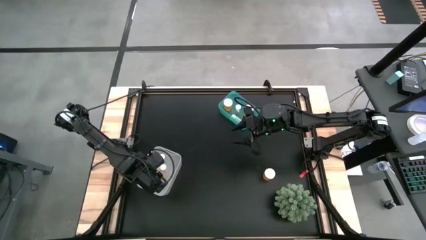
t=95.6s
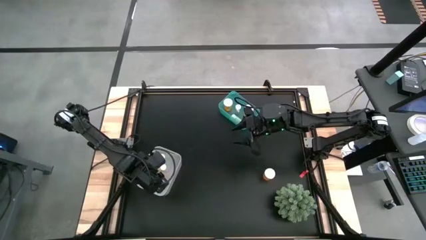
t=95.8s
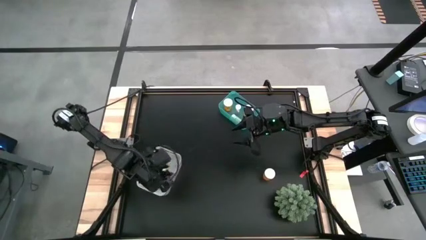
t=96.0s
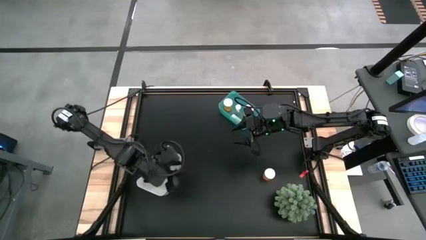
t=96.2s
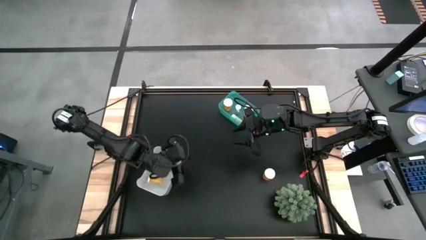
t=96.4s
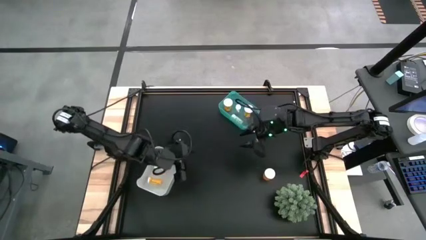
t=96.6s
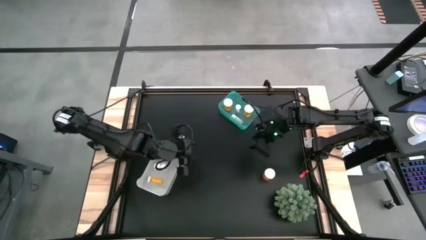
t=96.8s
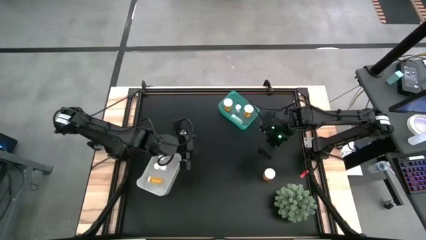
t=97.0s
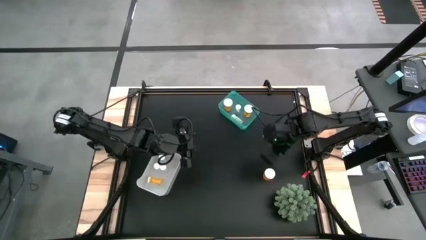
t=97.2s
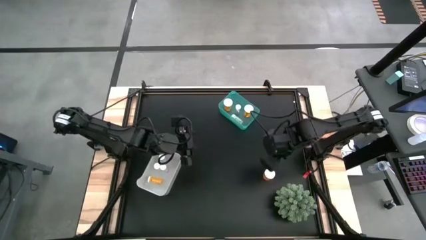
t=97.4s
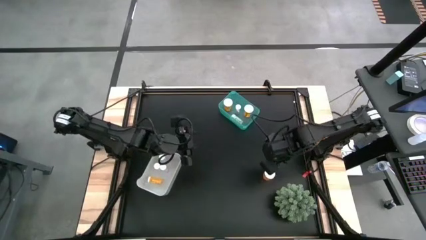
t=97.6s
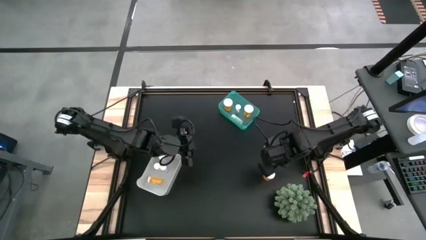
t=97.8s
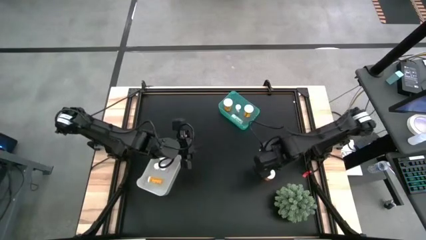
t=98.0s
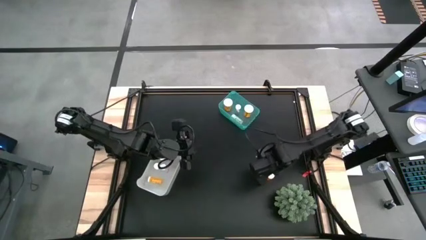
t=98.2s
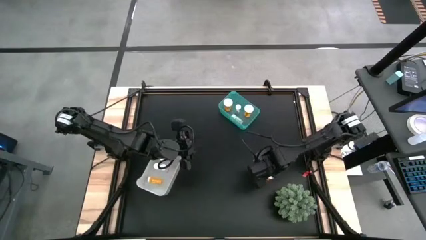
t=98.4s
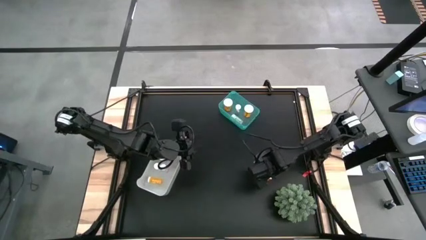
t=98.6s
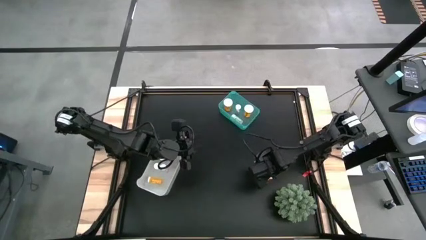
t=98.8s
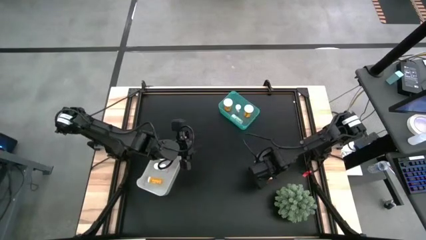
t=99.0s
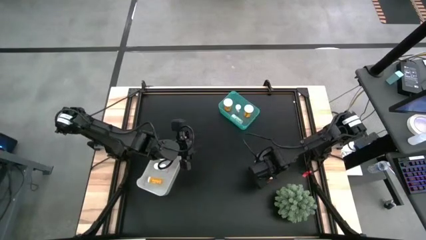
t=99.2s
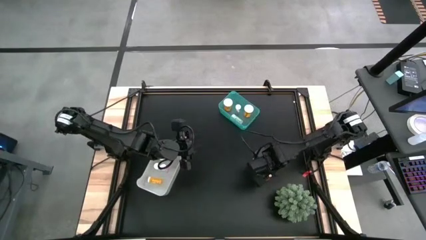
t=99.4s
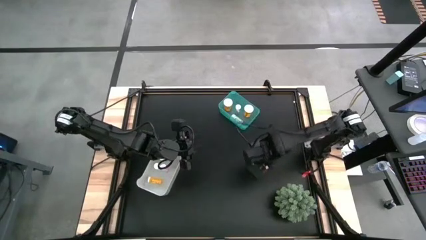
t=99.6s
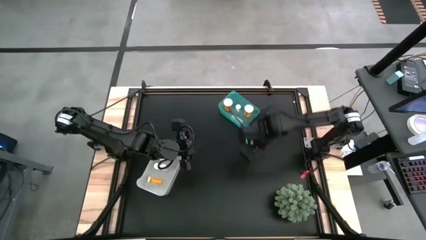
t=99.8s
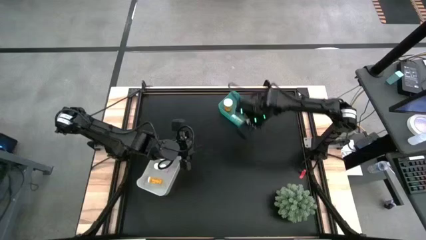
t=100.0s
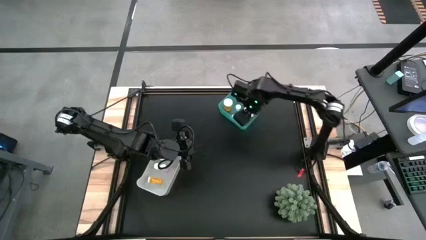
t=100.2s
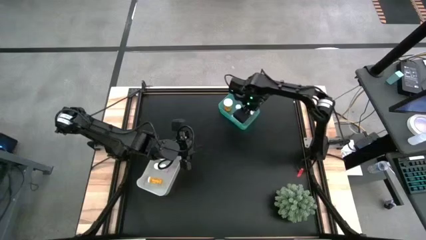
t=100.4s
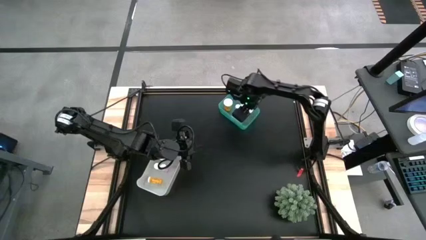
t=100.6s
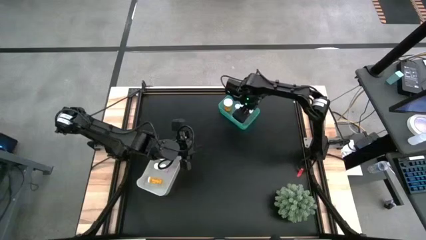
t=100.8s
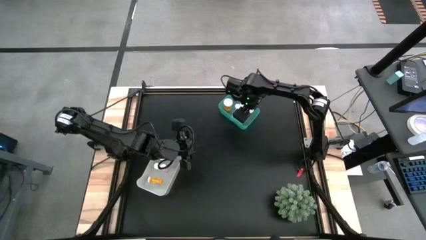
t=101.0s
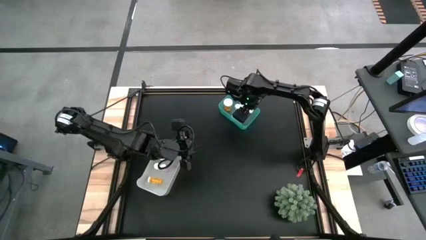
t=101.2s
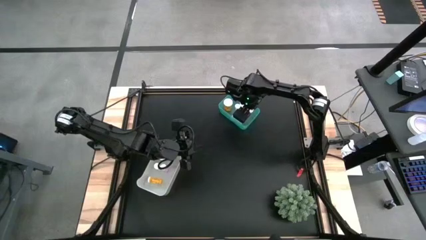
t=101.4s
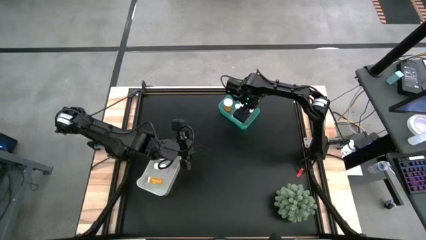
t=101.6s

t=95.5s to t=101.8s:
Task: Pick and place medicine bottles into bin by pill shape (circle, oval)
Put the orange capsule bottle into the blue bin

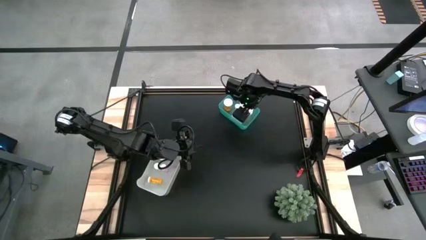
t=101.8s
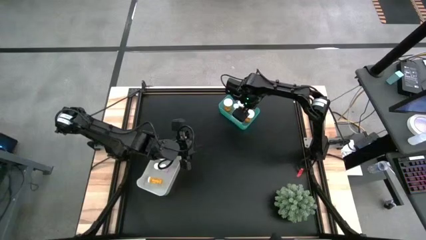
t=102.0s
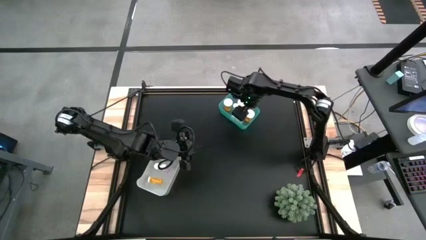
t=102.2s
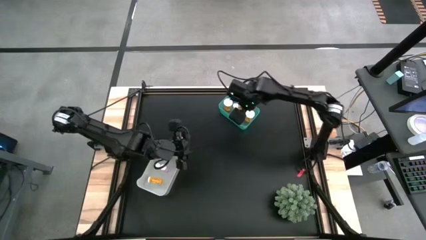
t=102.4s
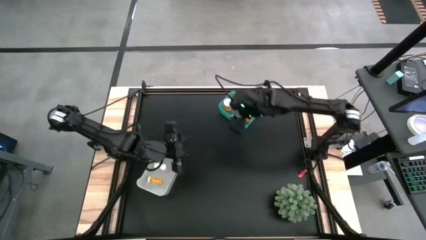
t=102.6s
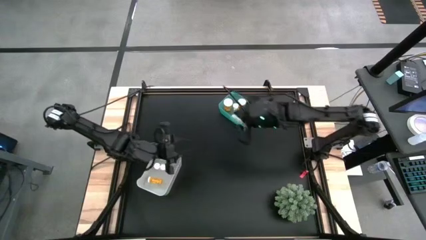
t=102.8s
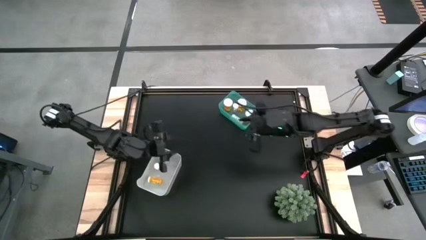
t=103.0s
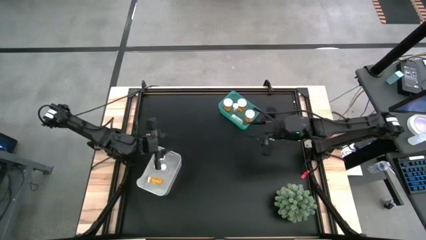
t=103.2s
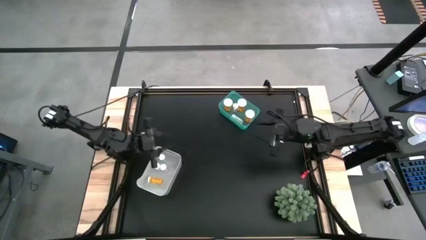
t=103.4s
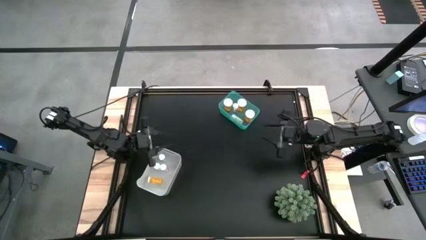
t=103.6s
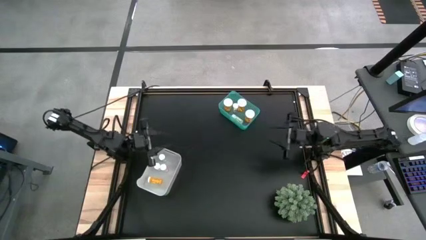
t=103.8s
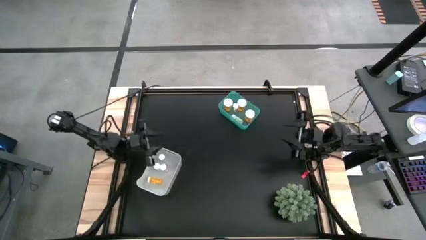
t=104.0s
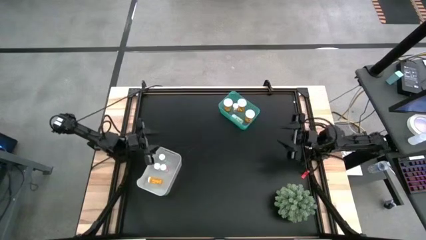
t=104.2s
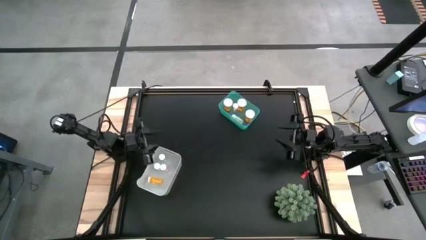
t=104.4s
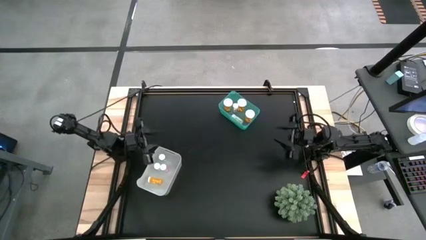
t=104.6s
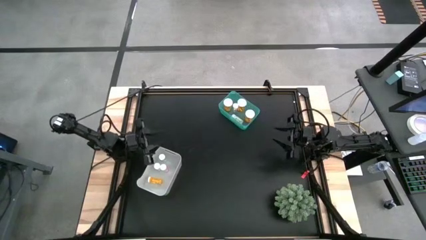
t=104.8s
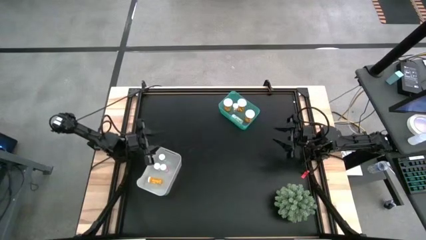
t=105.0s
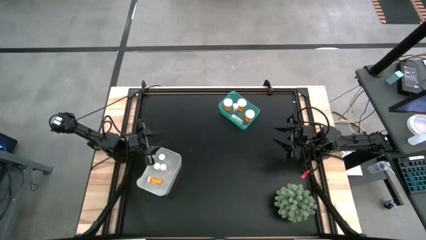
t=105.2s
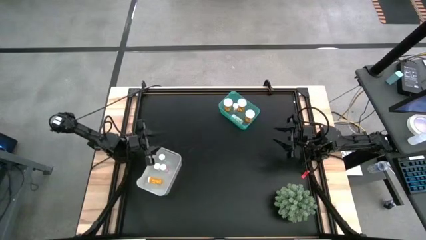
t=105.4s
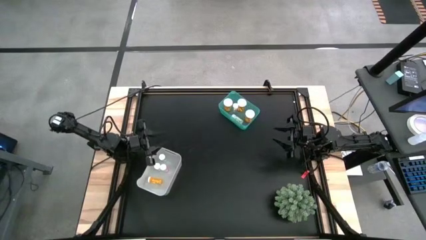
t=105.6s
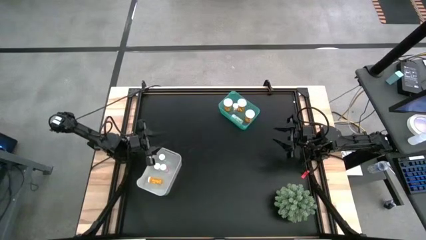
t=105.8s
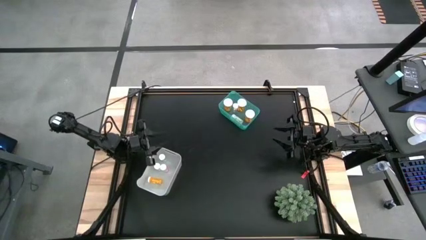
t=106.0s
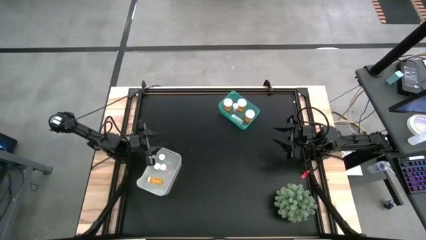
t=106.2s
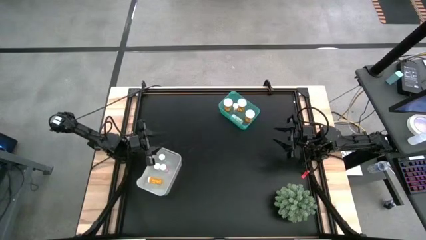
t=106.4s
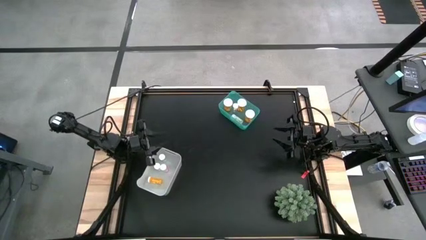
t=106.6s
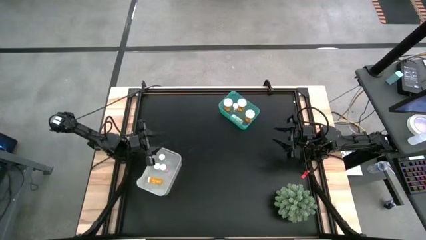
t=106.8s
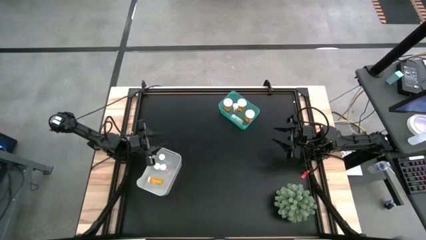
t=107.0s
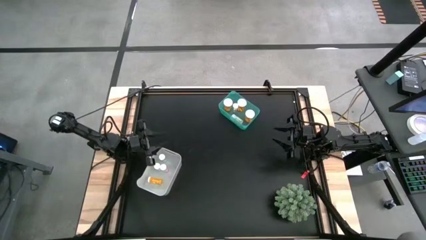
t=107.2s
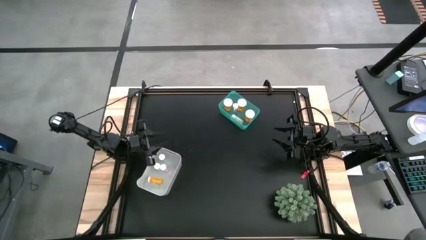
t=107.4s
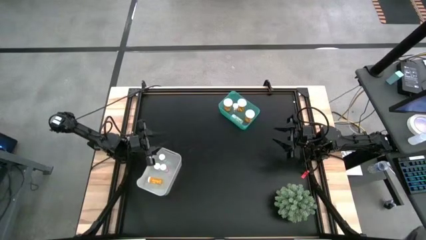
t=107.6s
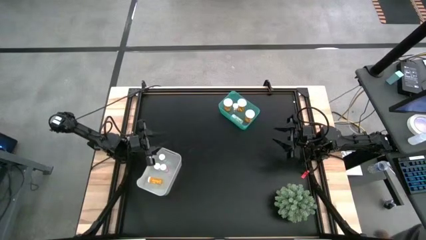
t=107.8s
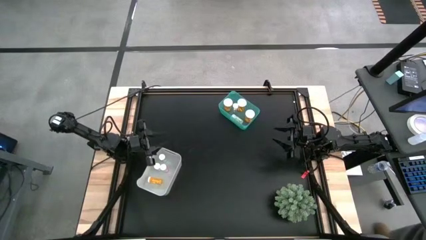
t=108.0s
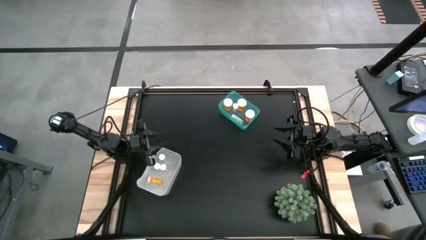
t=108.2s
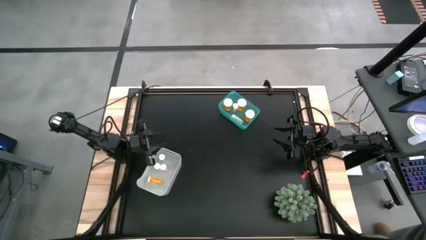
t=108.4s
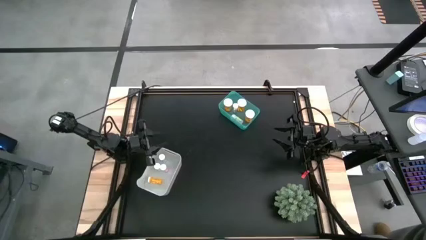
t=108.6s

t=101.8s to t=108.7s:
Return to Home Position
